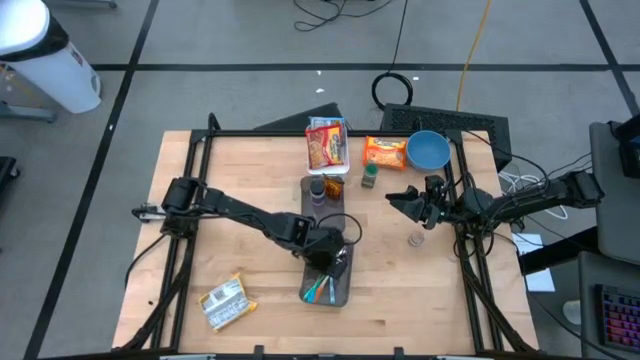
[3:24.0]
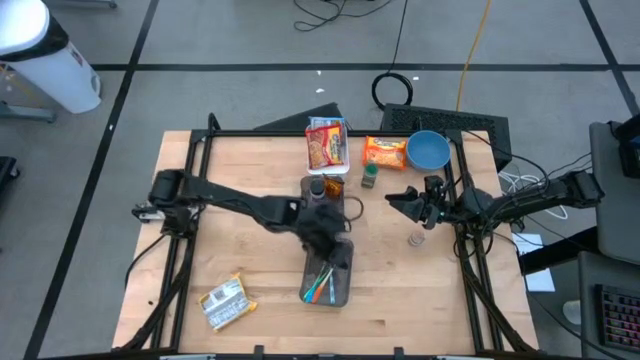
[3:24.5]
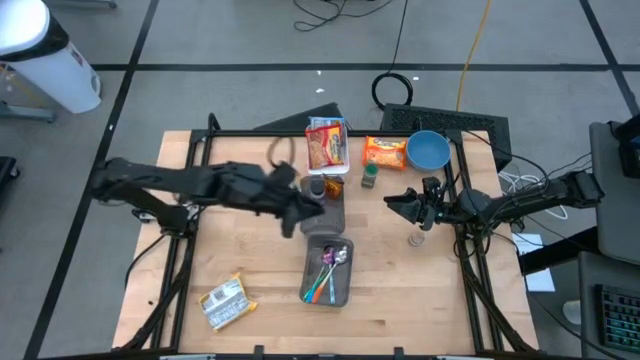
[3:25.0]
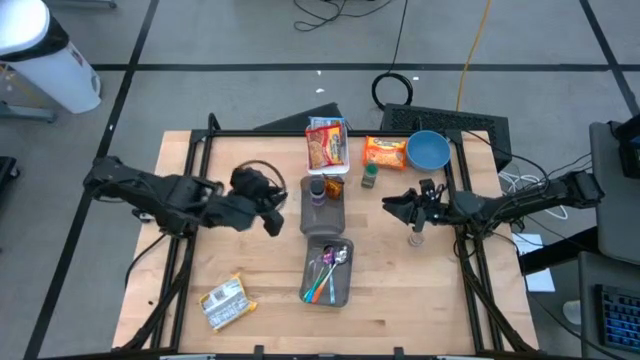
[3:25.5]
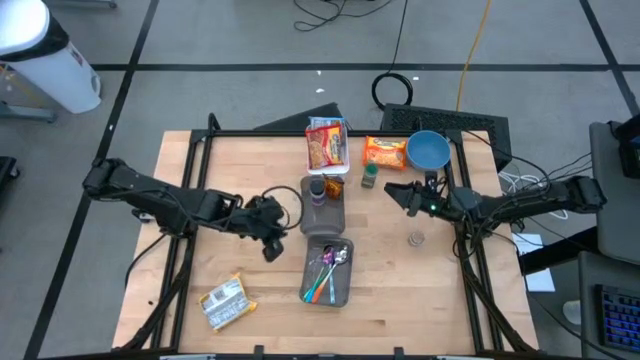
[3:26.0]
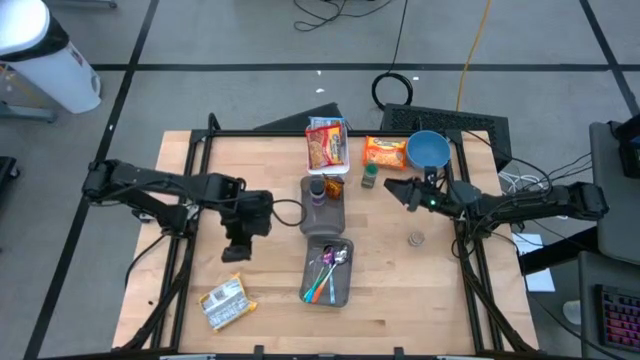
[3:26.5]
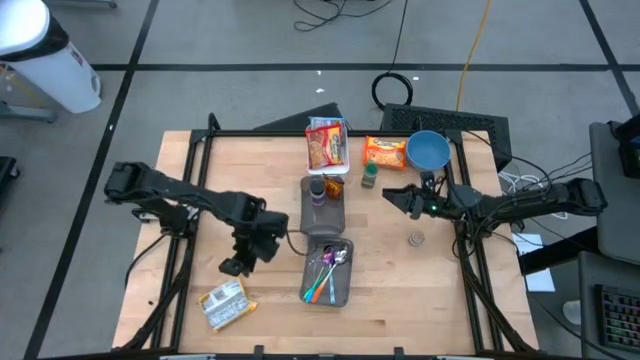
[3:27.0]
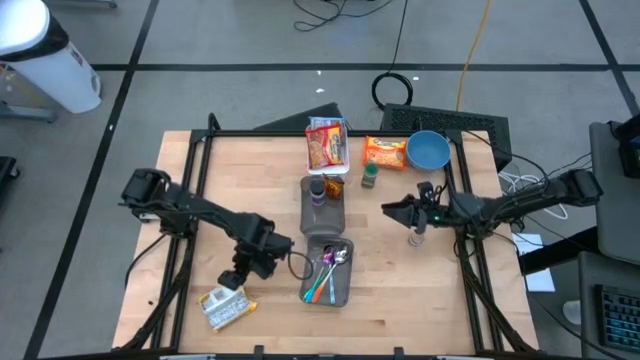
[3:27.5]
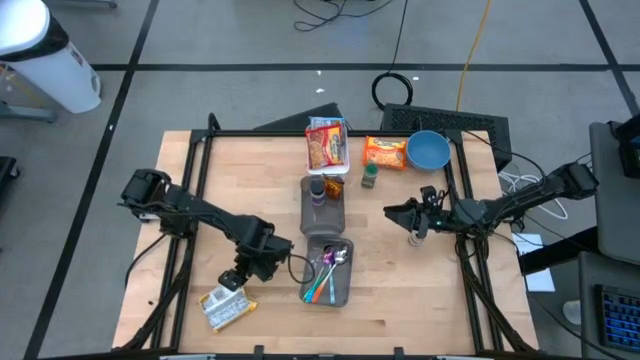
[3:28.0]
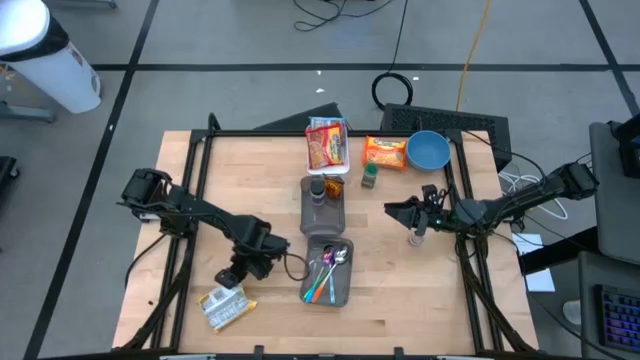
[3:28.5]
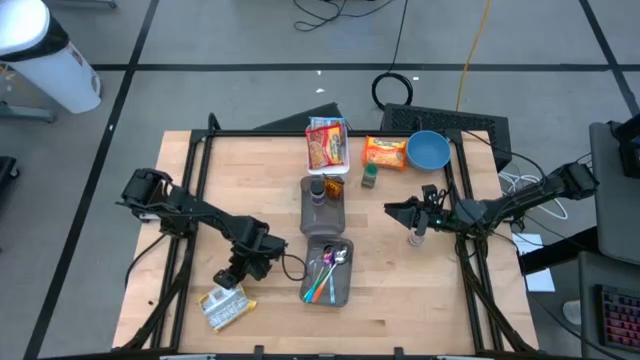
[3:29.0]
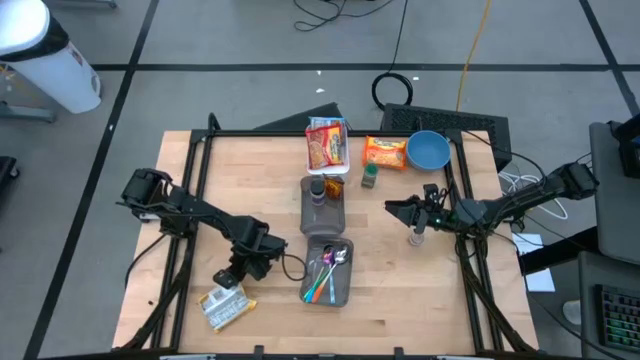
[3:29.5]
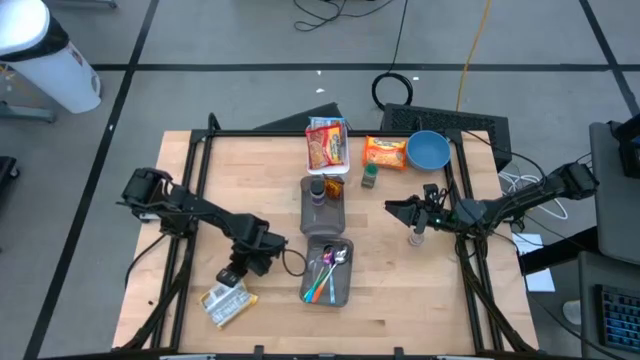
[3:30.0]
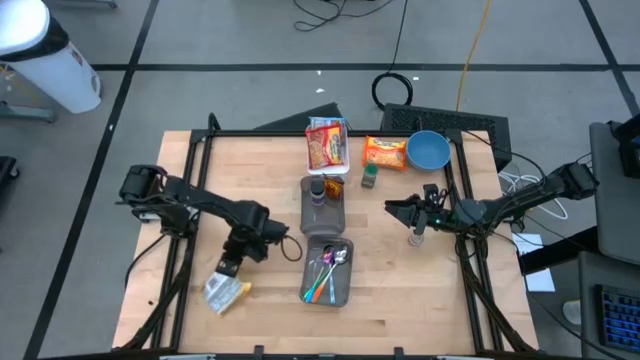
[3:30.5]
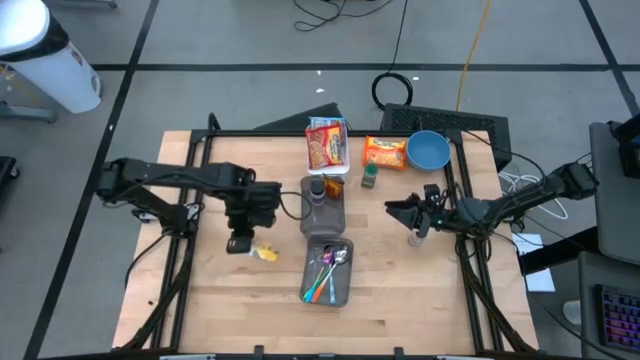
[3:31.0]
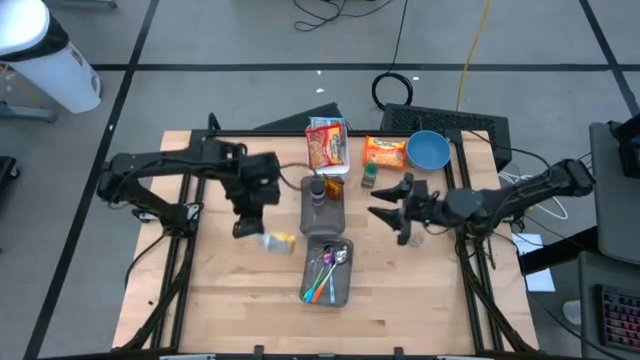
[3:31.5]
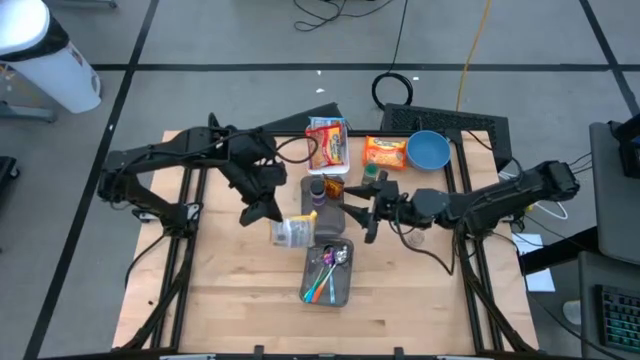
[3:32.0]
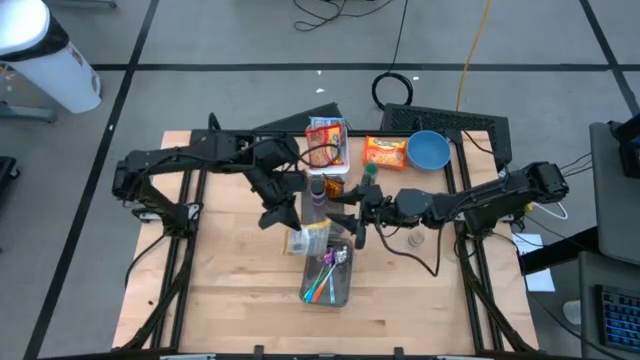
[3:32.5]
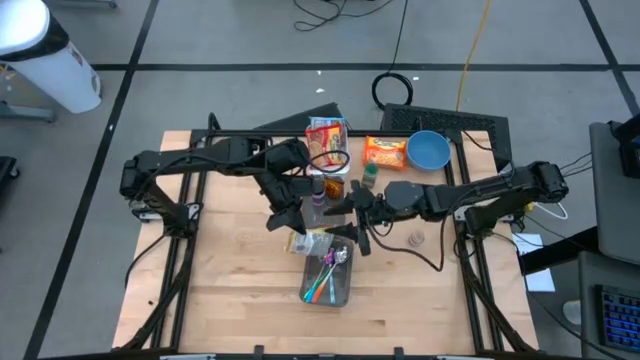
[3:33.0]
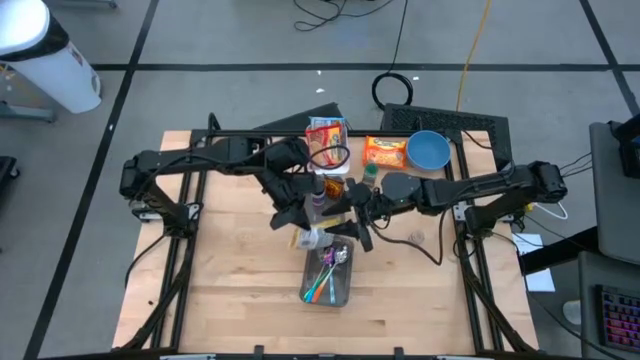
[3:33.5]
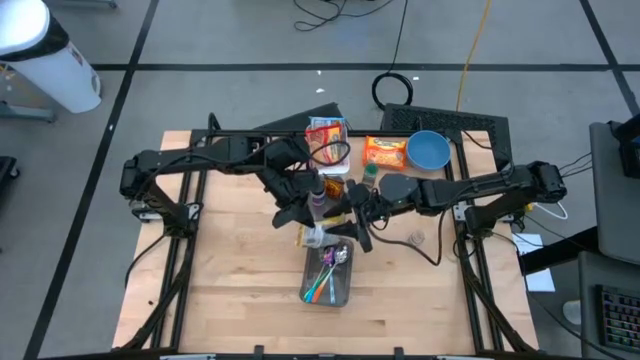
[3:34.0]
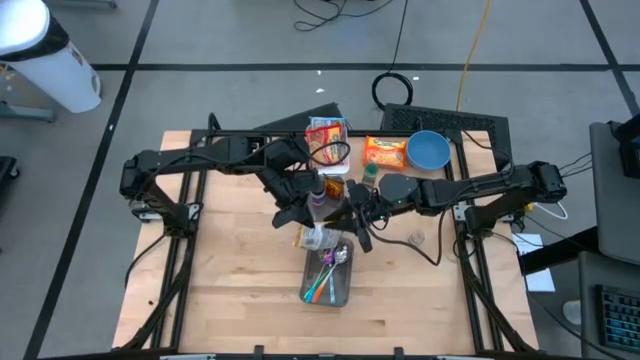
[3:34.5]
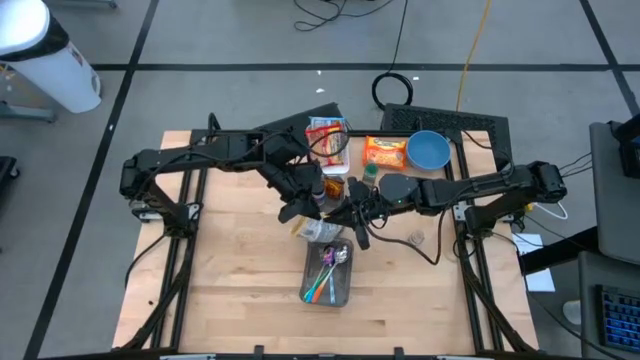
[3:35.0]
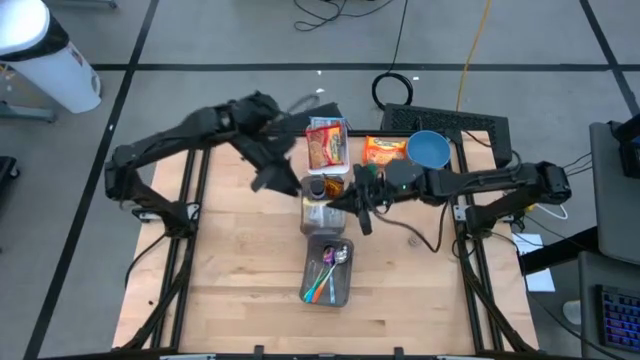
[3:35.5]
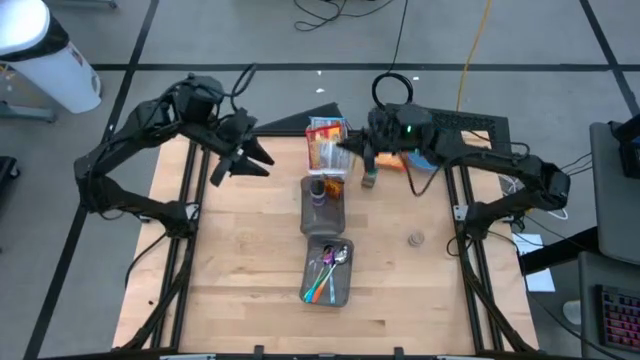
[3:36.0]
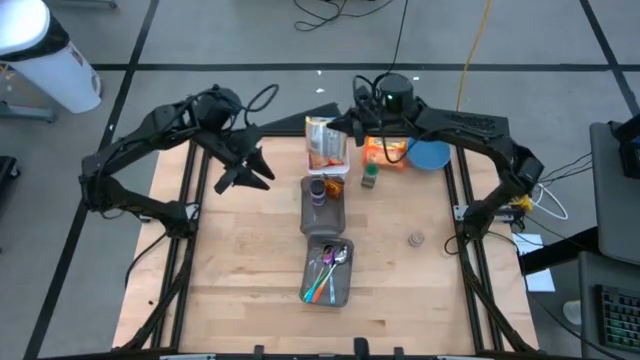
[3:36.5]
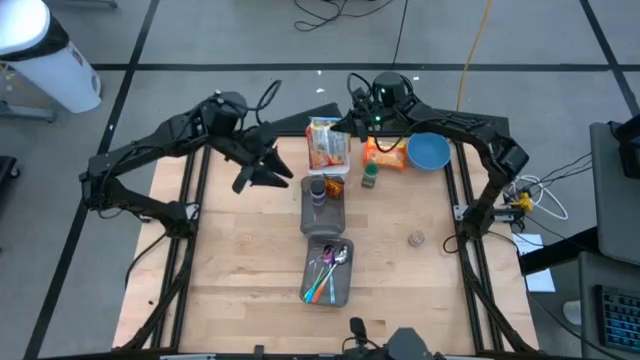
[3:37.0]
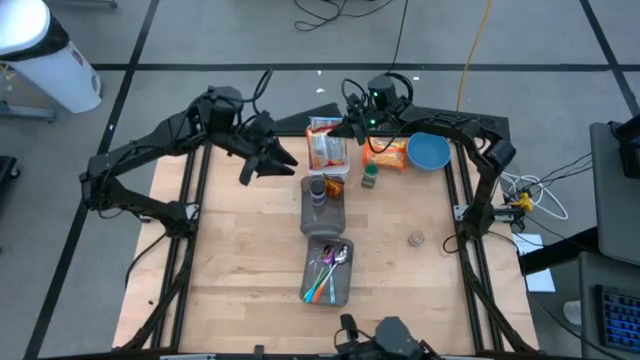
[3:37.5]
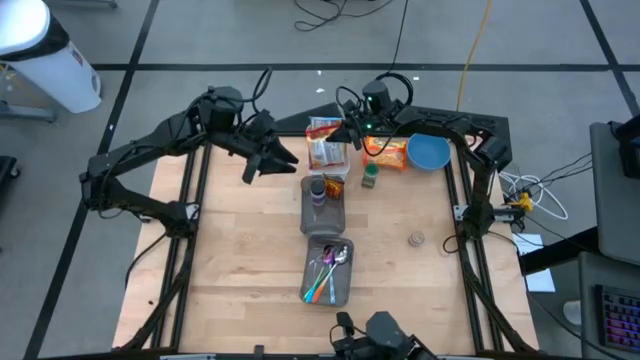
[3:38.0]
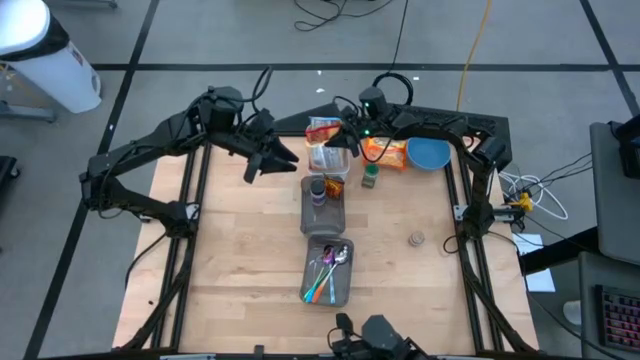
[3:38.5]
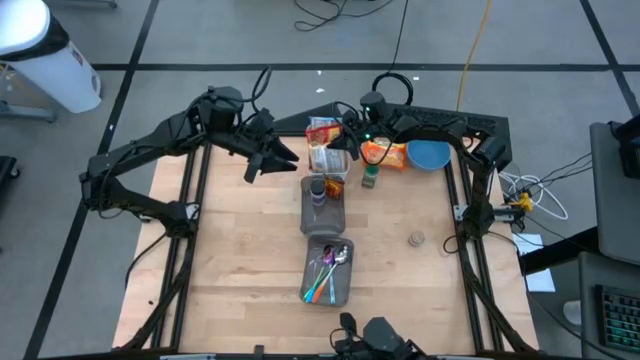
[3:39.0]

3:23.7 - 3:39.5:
Task: Pick & Place Food Item
Put the yellow noodle pack into the white bin

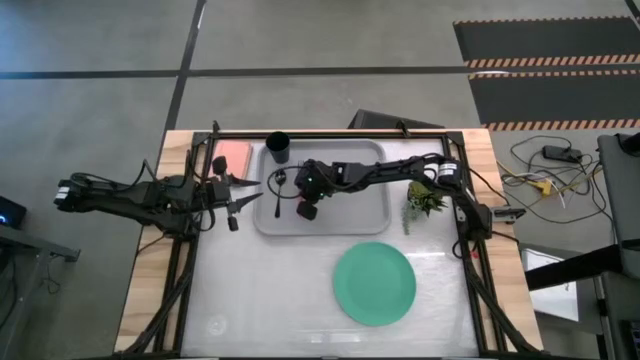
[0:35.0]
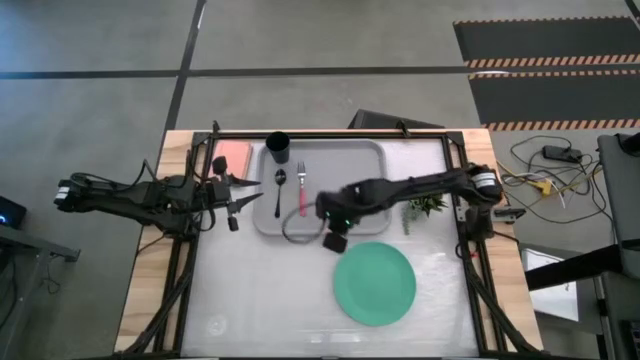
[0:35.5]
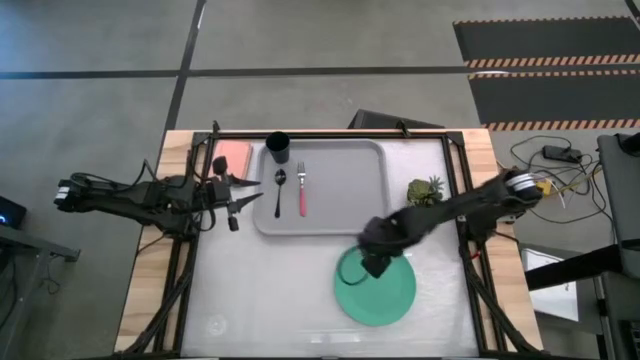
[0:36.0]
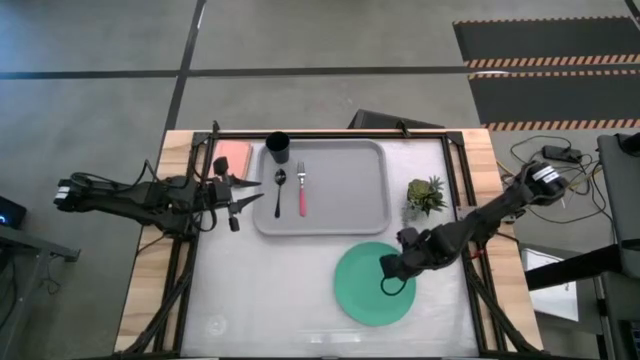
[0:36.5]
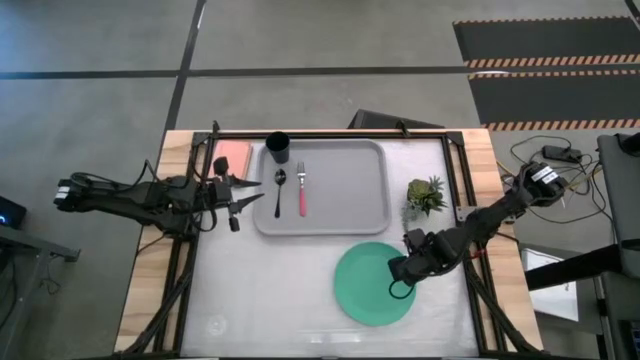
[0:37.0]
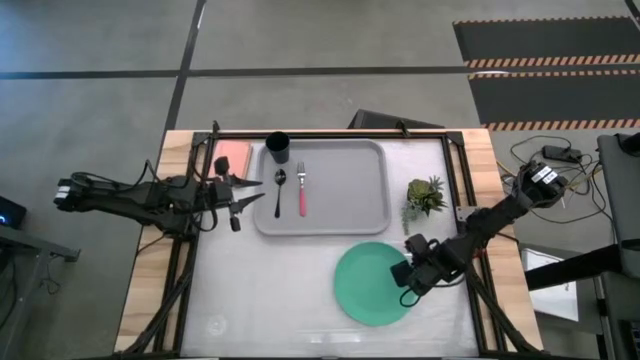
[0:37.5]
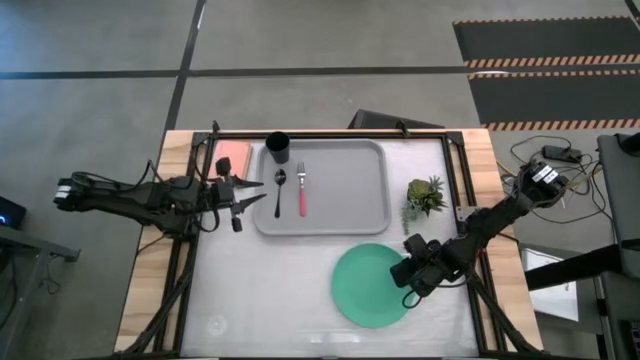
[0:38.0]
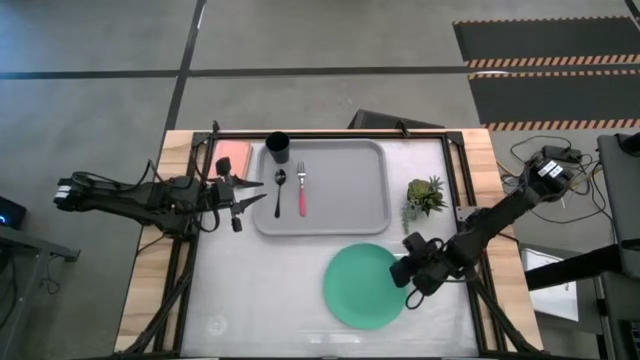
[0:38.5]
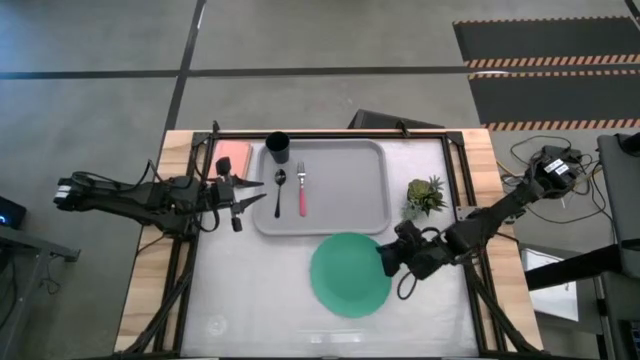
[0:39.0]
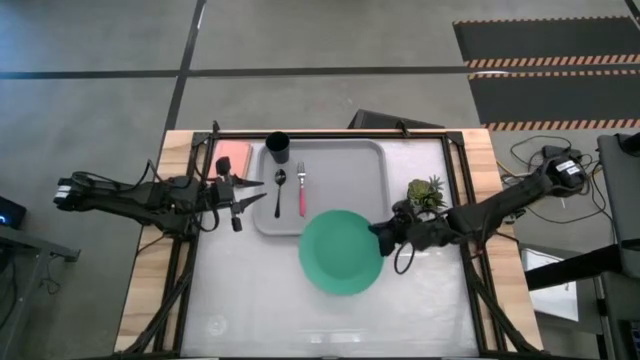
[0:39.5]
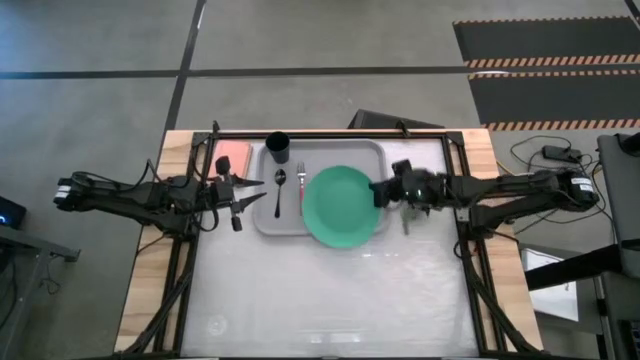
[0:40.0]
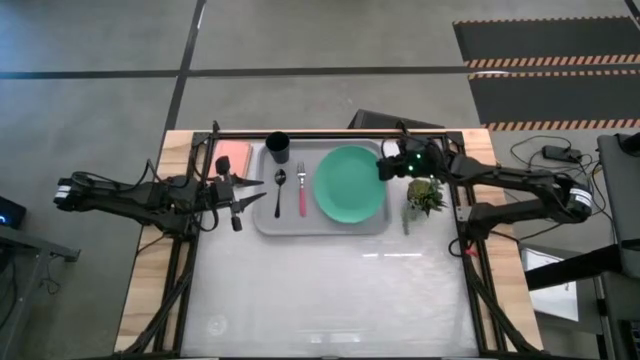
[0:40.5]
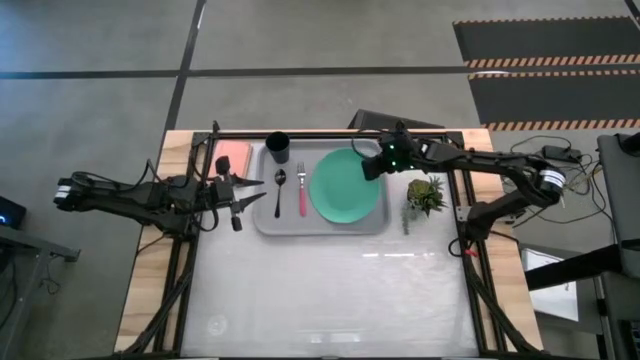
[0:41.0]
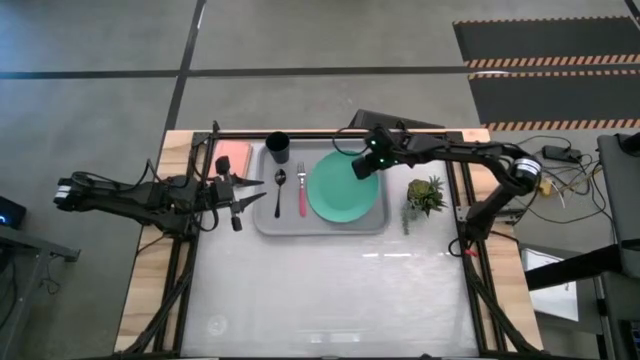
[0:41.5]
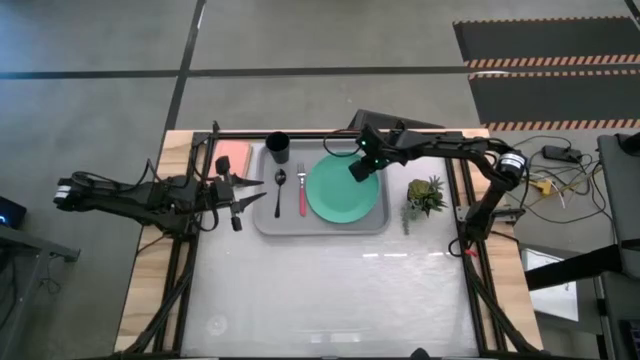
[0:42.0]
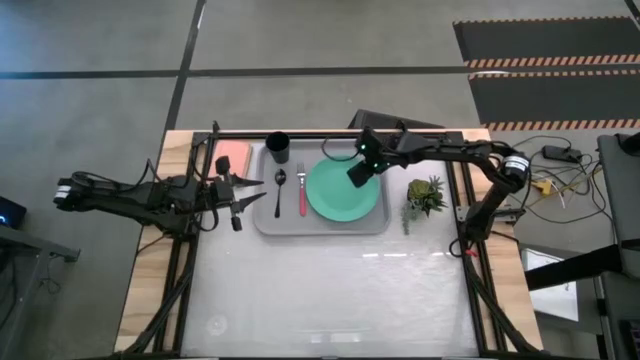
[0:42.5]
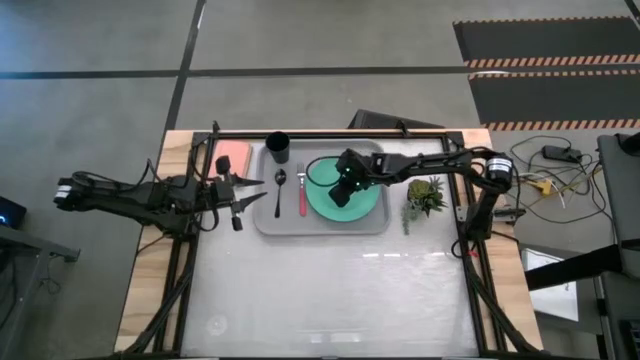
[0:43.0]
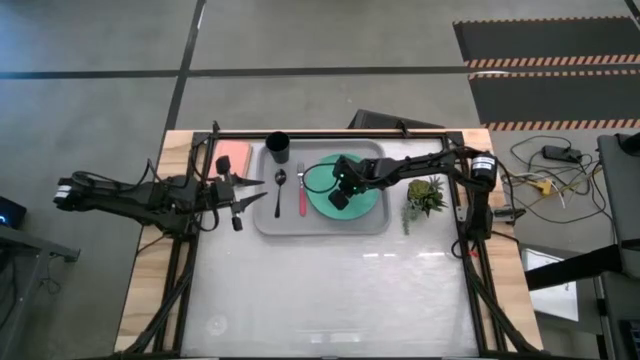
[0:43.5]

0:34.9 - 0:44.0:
Task: Pick and place plate/cup/fork/spoon on tray
Put the green plate on the gray serving tray right beside the pink fork
